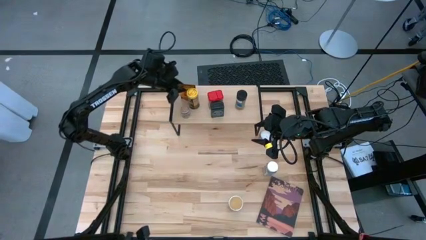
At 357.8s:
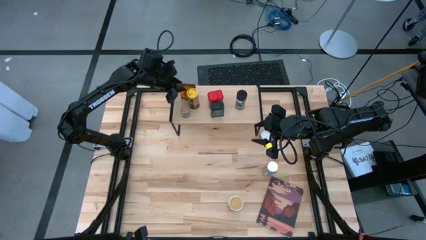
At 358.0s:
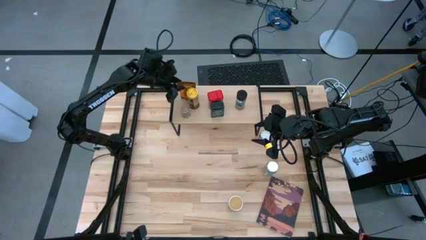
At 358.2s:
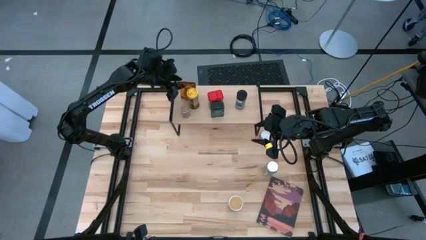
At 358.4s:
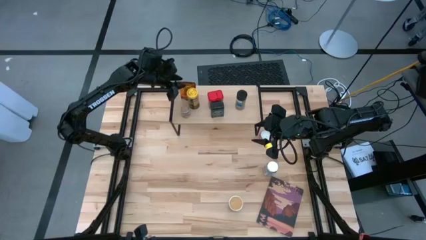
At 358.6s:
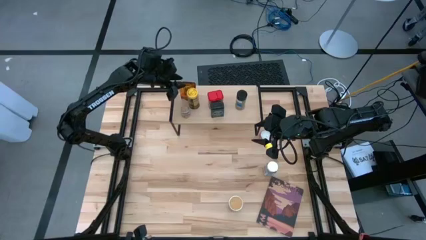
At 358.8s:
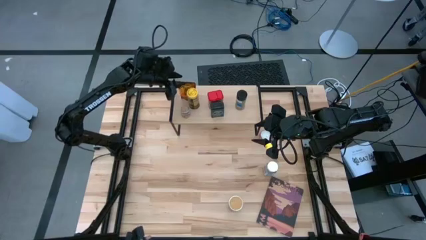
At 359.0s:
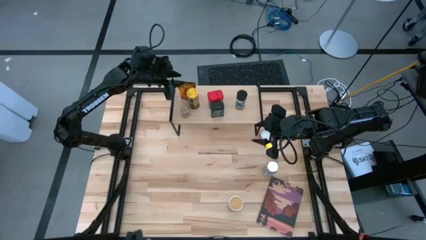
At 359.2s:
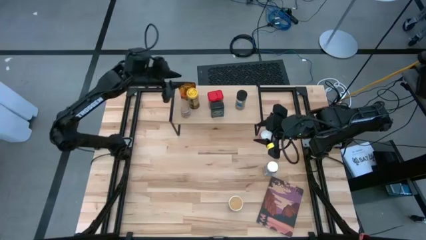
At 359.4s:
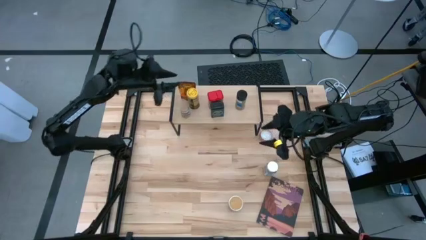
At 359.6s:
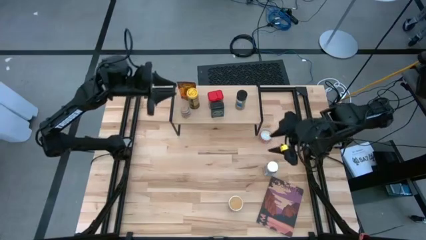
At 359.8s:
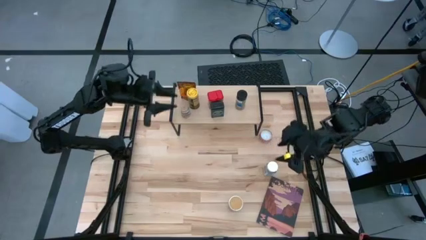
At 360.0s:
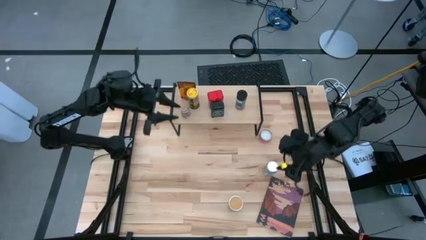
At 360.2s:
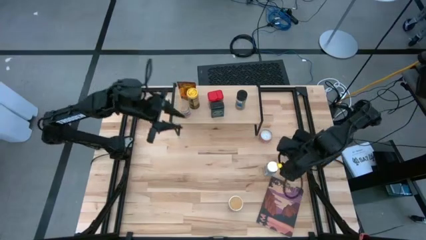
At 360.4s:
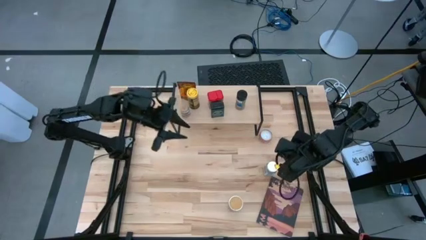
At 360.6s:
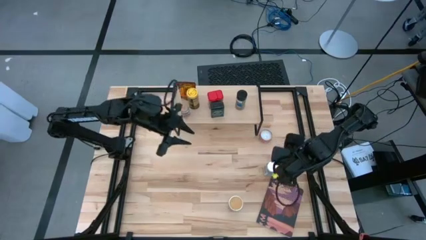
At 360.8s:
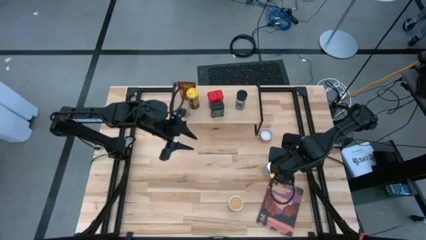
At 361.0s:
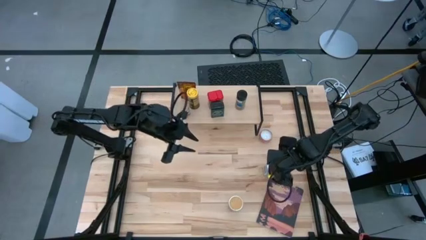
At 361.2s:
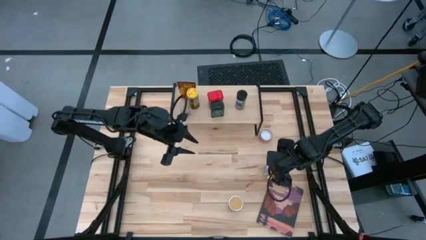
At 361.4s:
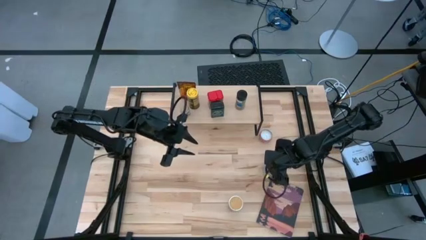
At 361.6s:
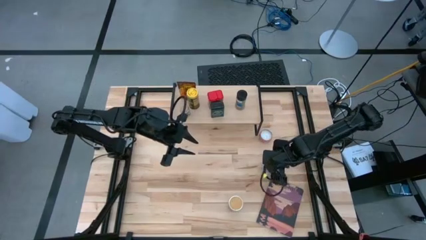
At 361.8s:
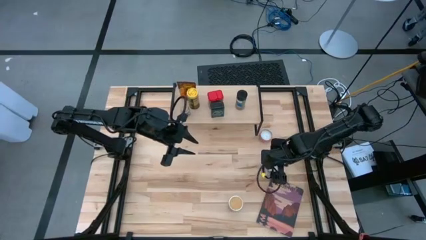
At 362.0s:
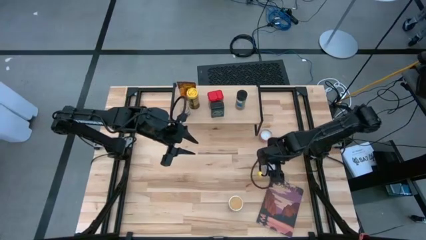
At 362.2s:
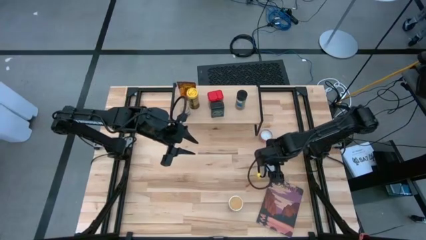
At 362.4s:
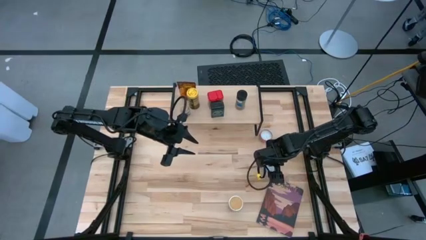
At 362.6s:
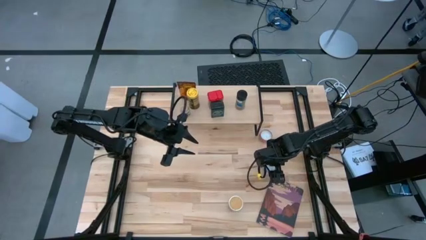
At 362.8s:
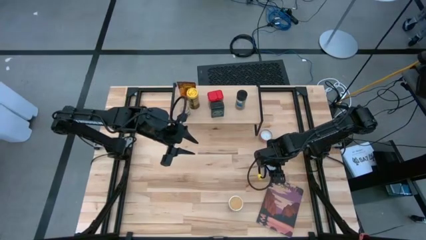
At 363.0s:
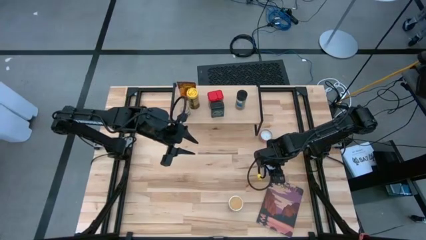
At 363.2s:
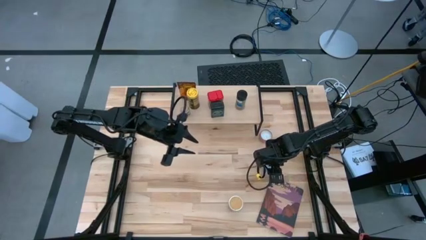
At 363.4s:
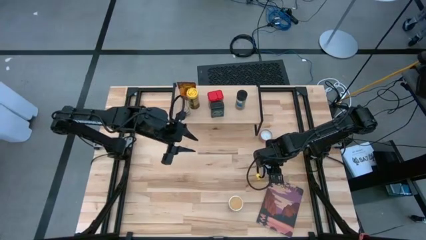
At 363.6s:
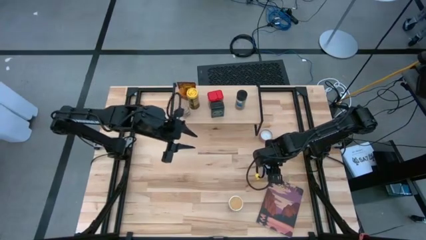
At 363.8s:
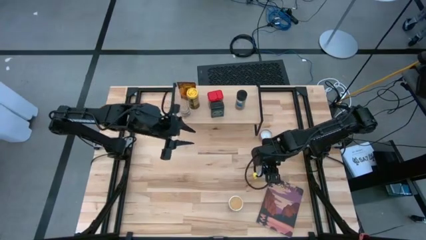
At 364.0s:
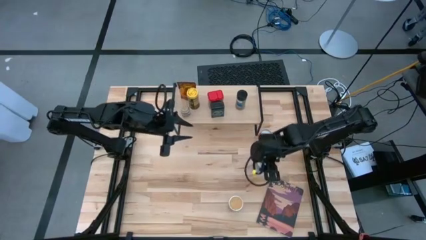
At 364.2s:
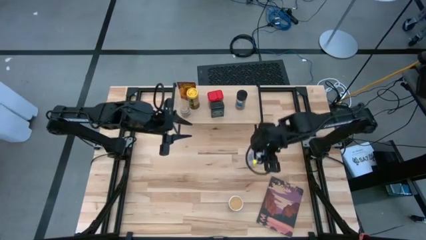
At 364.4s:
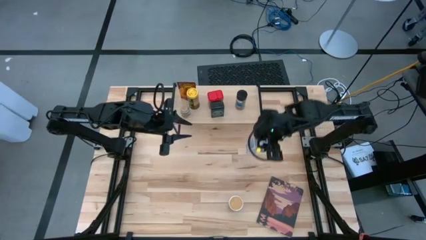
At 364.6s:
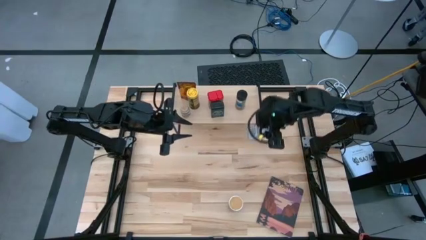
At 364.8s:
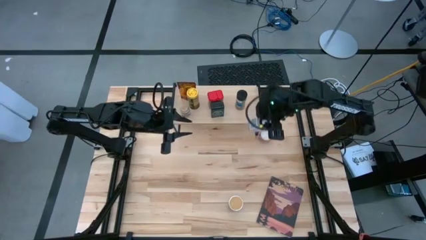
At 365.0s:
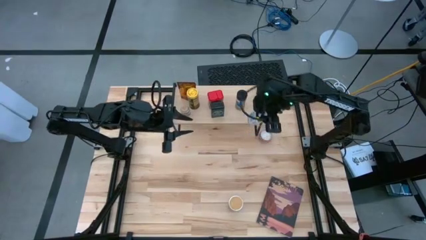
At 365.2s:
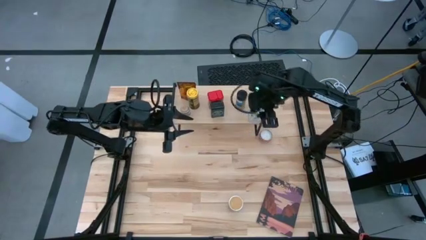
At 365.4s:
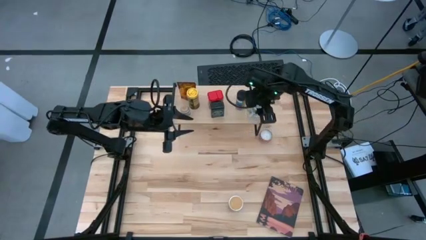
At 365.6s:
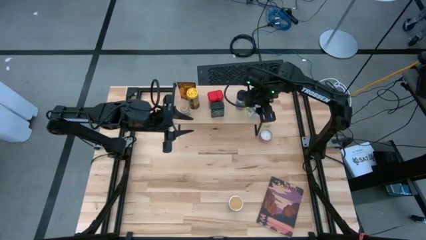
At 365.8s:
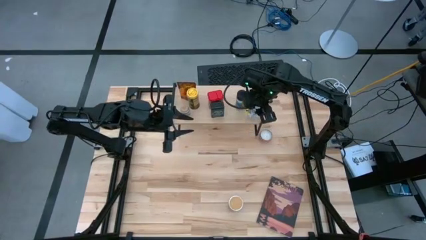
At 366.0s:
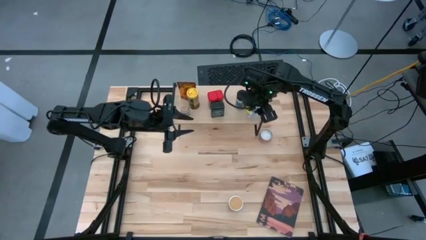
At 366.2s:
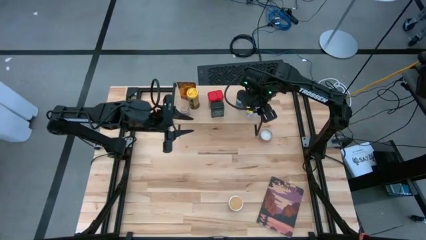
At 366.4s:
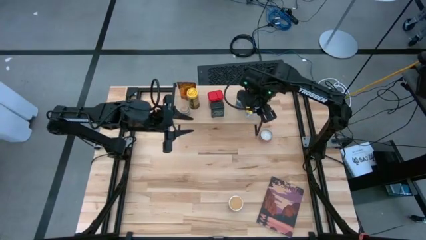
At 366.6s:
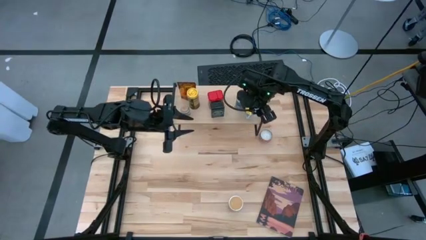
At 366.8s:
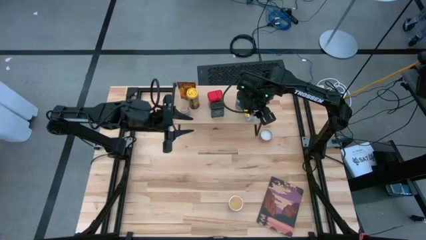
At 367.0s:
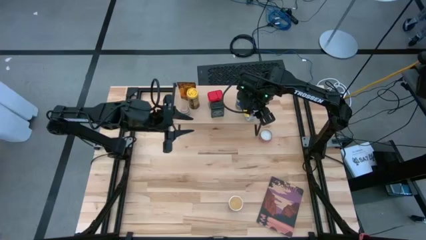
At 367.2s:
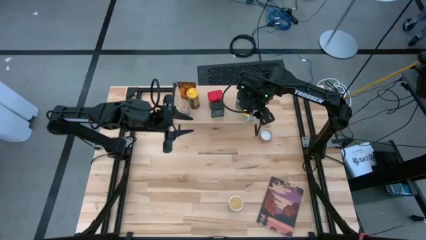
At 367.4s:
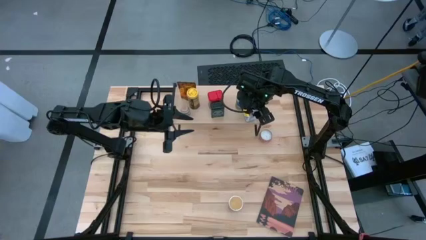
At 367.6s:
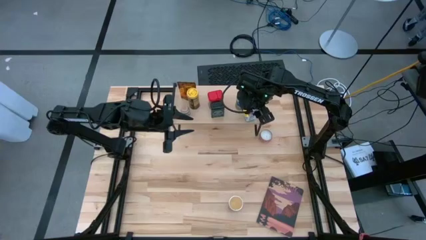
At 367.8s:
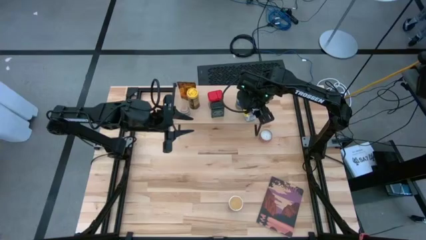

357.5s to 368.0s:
Task: Shelf spices
Put the white spice bottle on the shelf

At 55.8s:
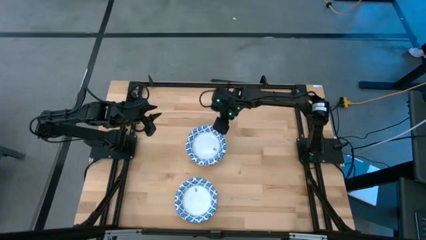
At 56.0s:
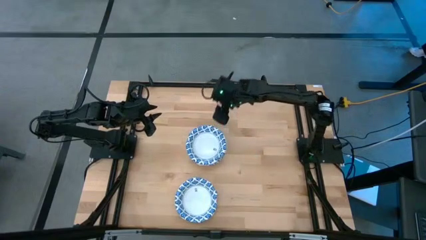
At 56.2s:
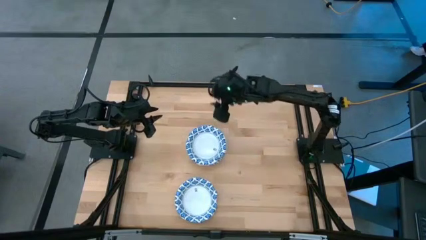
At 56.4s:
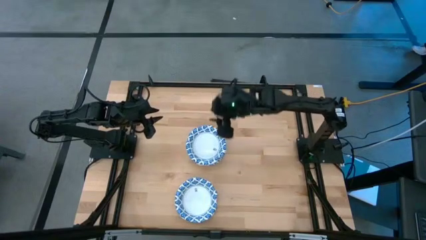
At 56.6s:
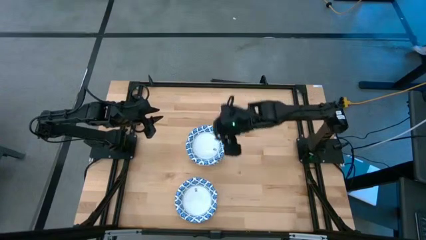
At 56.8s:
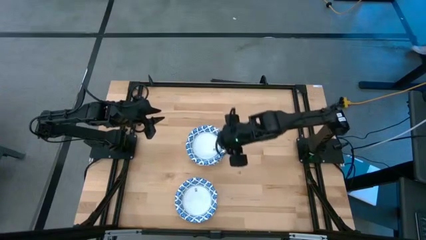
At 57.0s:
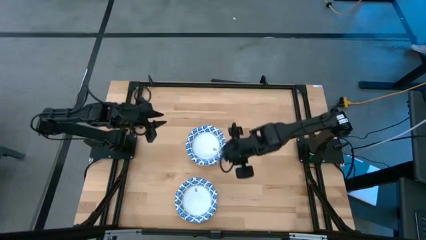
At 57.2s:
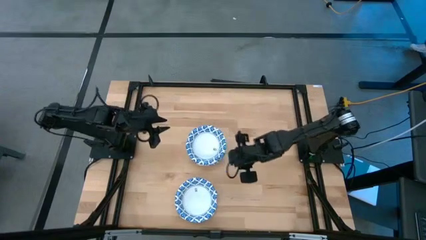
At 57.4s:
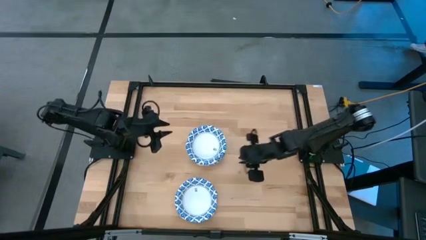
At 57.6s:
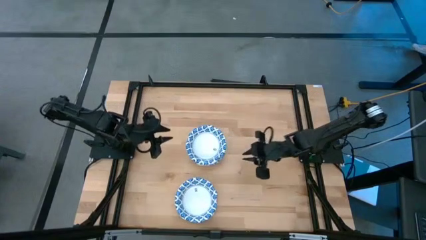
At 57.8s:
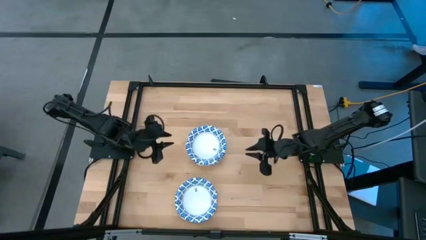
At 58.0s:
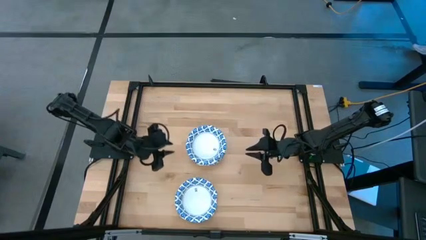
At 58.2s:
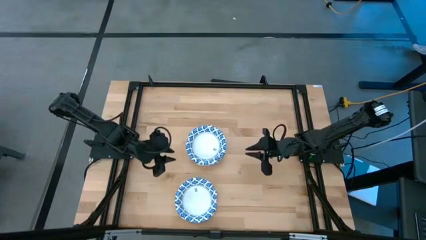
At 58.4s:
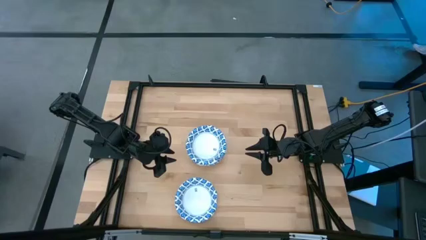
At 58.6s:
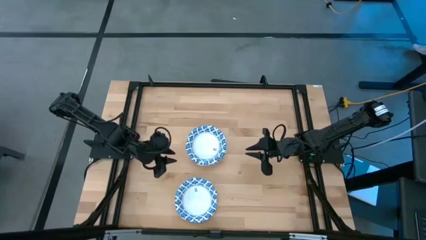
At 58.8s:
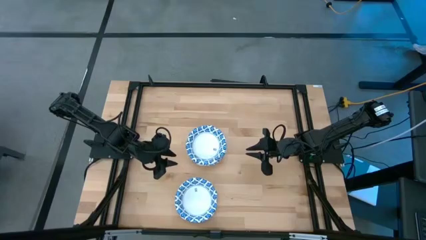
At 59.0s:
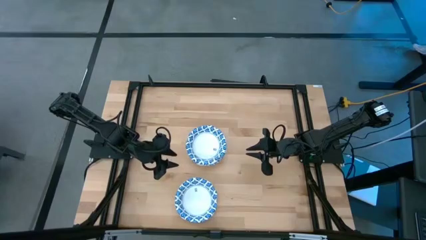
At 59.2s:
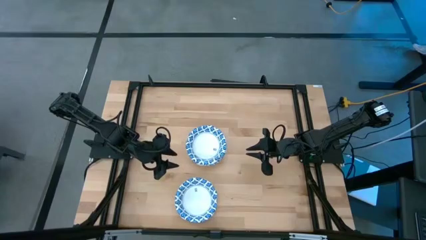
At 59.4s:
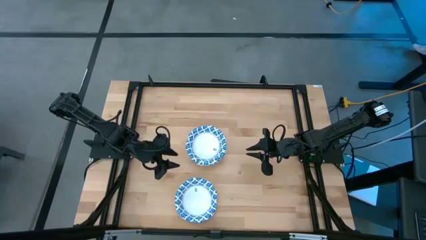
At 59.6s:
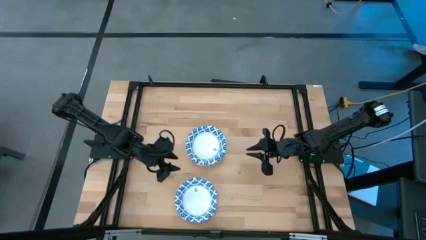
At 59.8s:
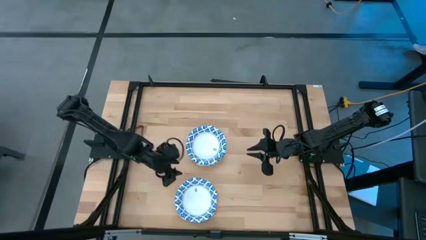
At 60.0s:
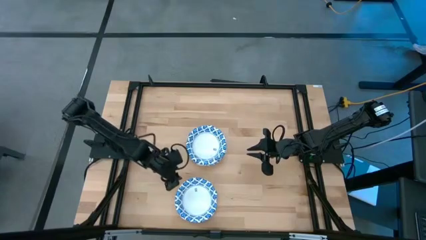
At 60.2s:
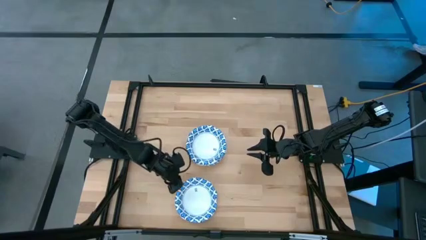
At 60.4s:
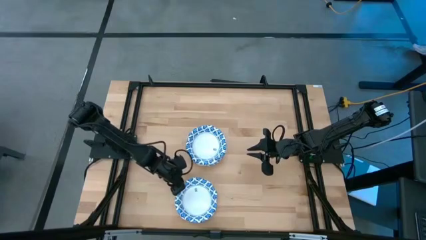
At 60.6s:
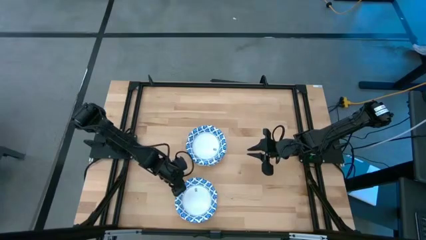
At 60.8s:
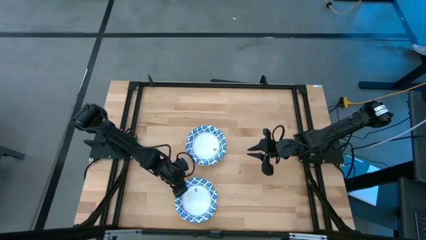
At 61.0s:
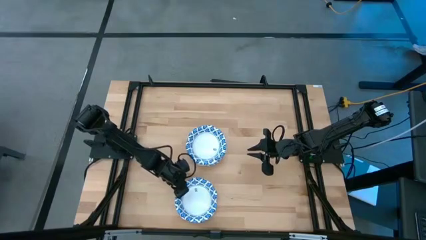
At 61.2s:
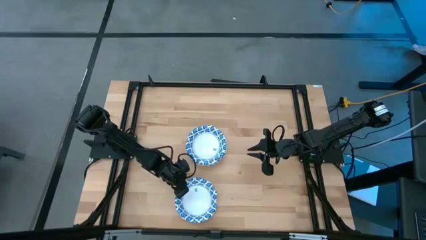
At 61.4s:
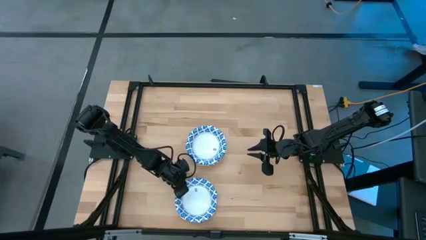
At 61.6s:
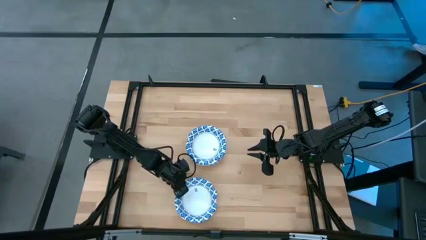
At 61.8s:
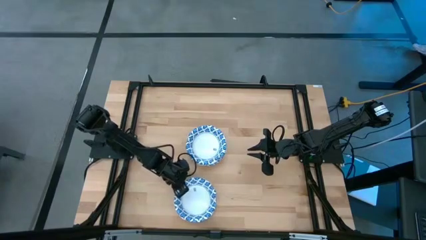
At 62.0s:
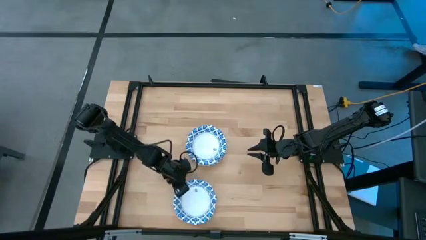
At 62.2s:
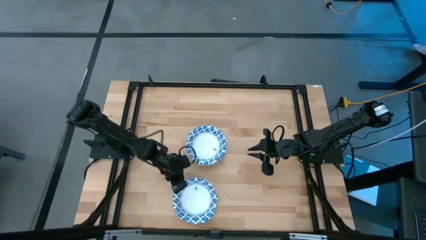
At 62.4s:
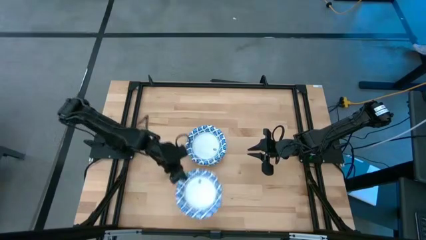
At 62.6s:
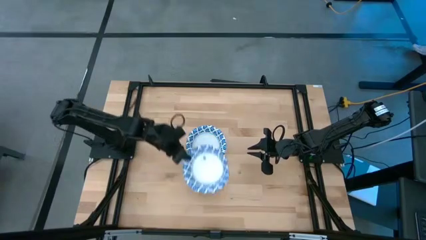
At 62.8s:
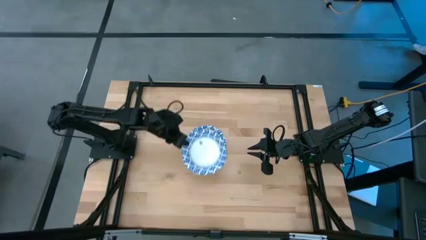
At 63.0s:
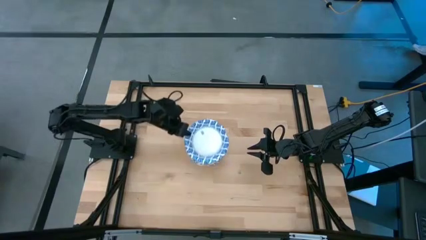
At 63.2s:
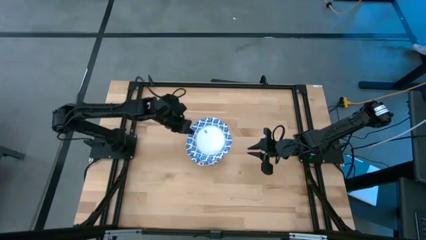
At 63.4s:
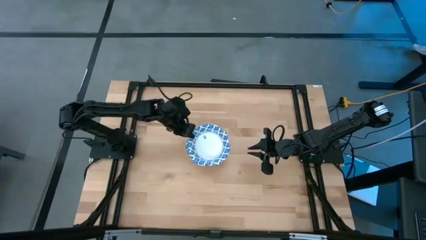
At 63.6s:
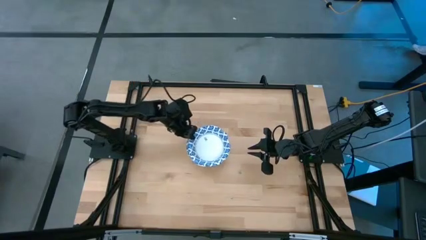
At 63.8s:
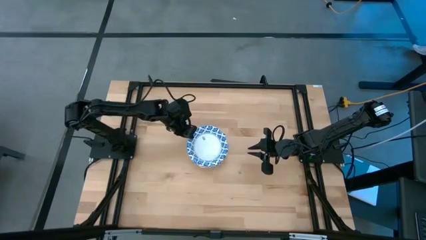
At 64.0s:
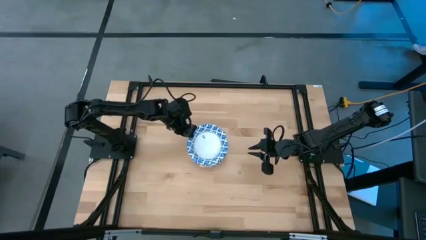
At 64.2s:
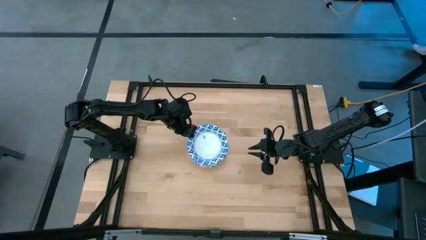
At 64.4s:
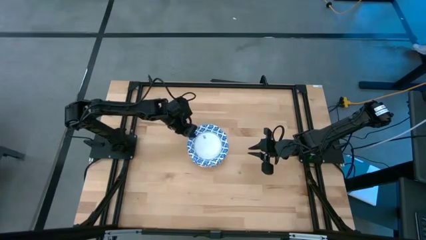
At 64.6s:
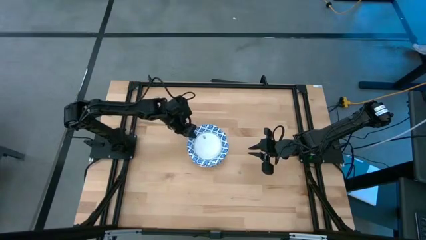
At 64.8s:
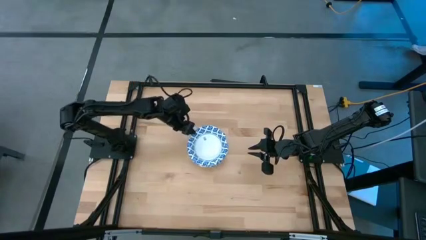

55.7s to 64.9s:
Task: Nest bowls inside each other
Stack the white bowl on the white bowl
